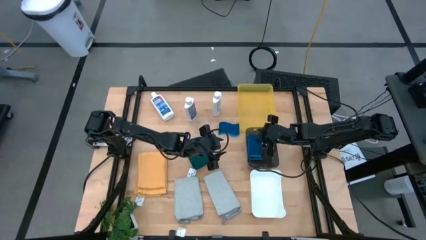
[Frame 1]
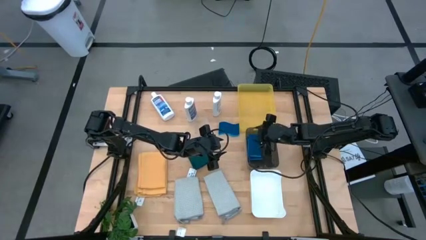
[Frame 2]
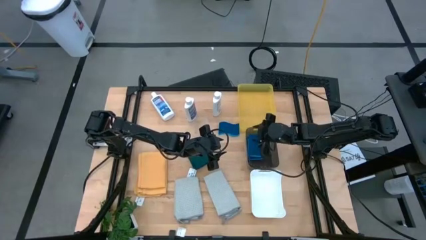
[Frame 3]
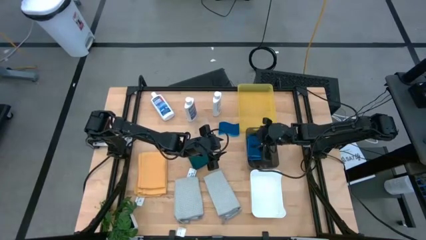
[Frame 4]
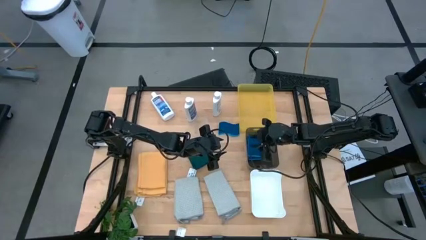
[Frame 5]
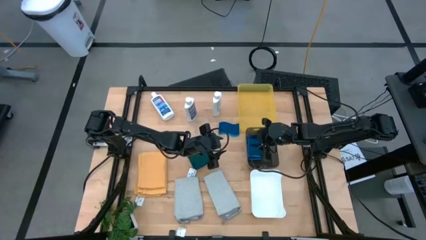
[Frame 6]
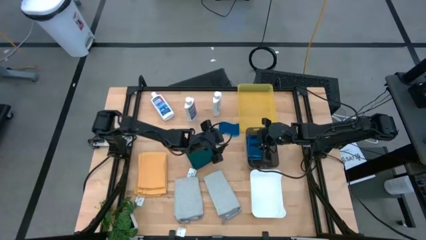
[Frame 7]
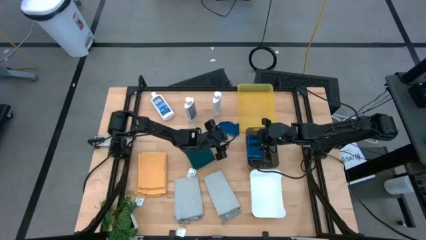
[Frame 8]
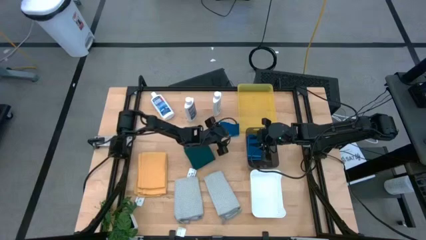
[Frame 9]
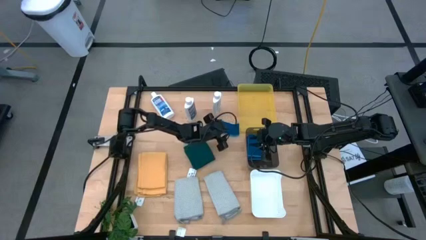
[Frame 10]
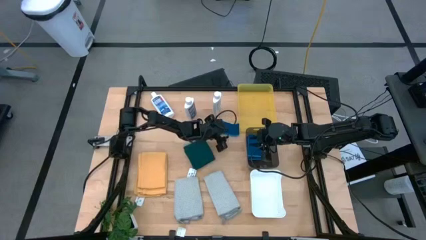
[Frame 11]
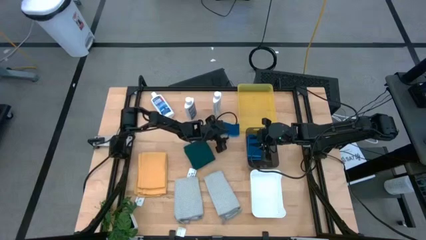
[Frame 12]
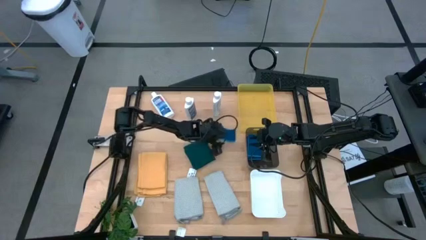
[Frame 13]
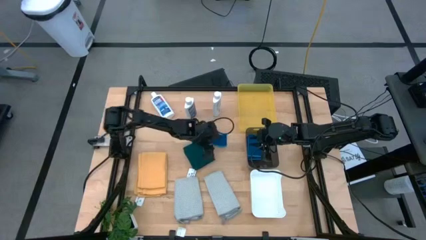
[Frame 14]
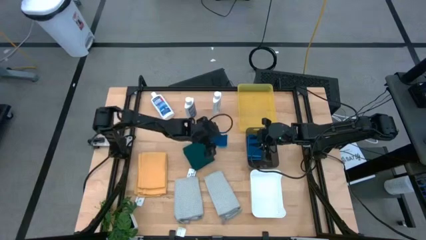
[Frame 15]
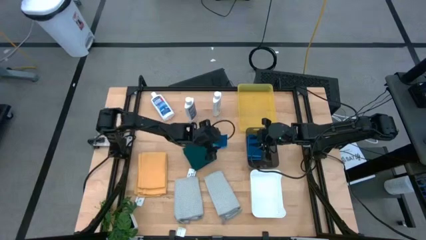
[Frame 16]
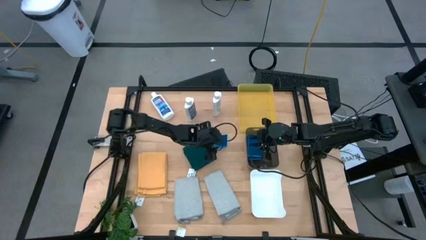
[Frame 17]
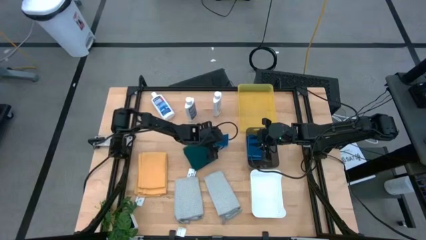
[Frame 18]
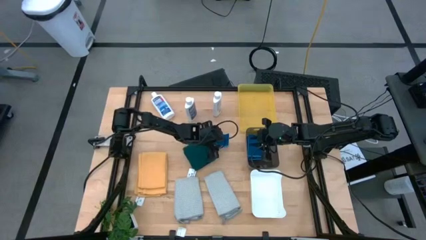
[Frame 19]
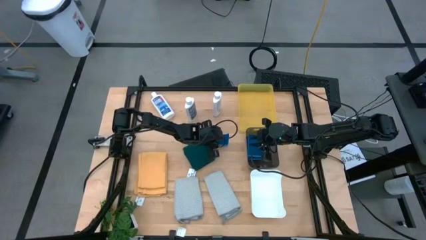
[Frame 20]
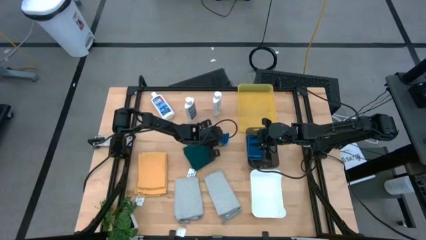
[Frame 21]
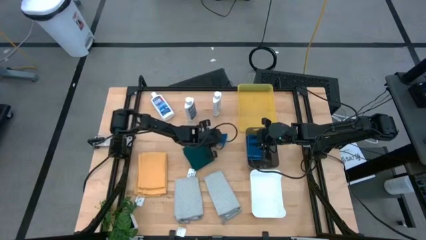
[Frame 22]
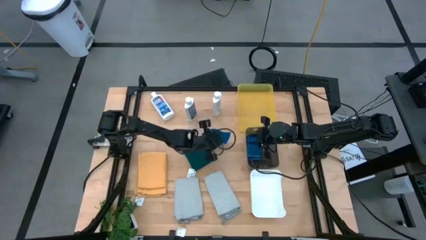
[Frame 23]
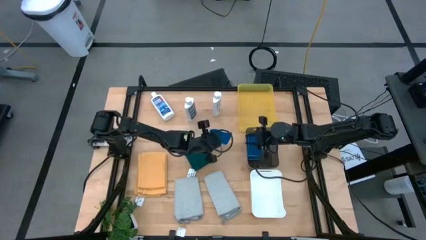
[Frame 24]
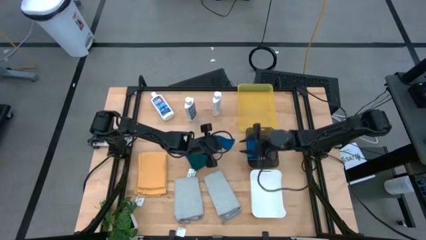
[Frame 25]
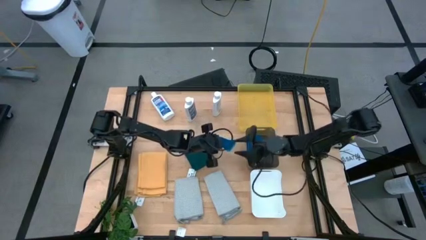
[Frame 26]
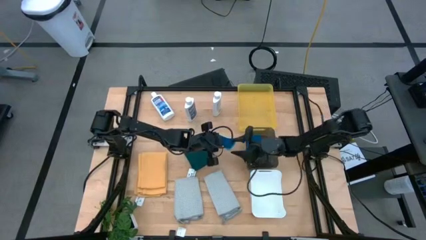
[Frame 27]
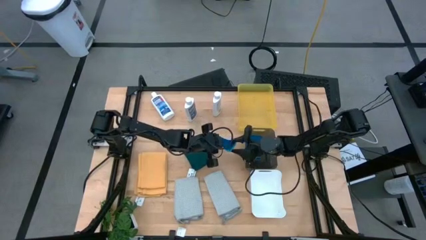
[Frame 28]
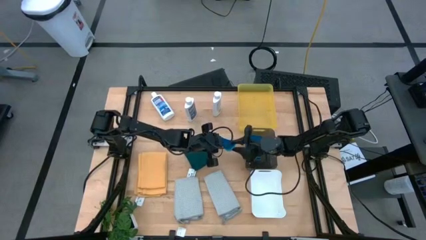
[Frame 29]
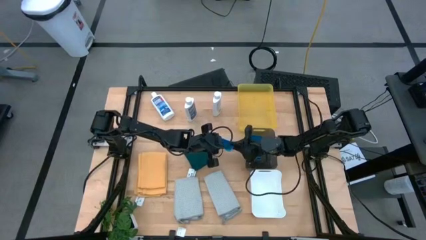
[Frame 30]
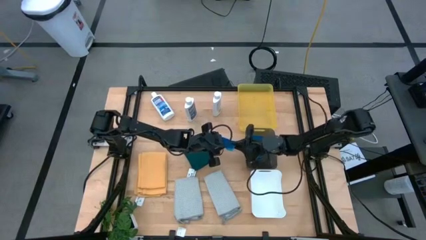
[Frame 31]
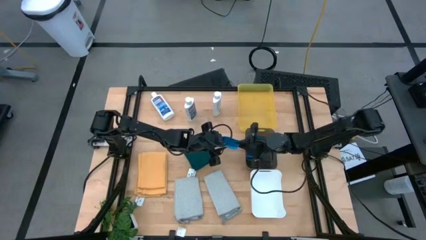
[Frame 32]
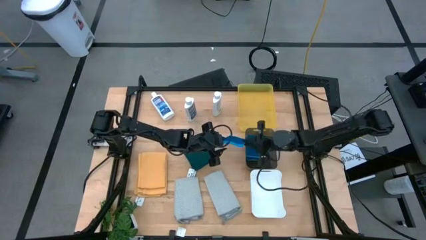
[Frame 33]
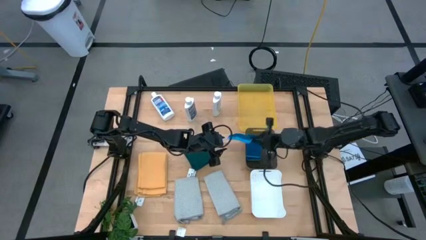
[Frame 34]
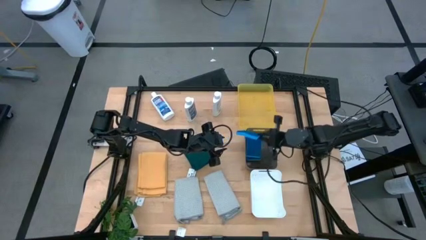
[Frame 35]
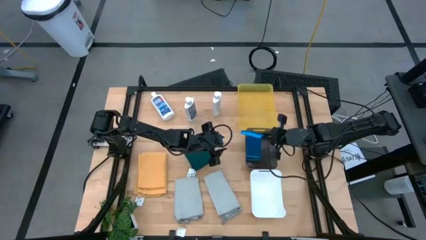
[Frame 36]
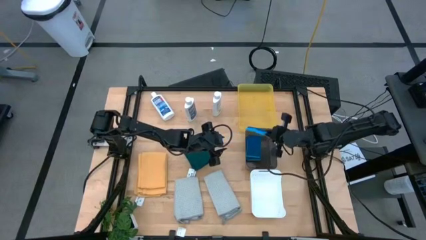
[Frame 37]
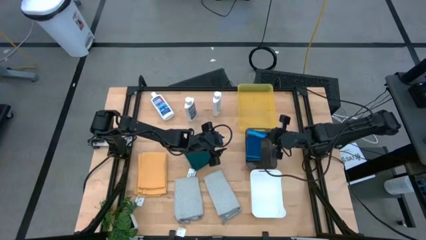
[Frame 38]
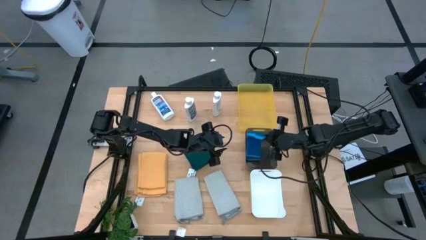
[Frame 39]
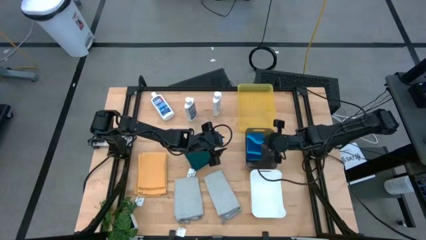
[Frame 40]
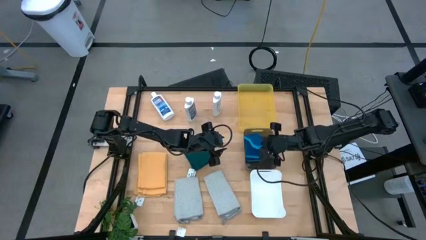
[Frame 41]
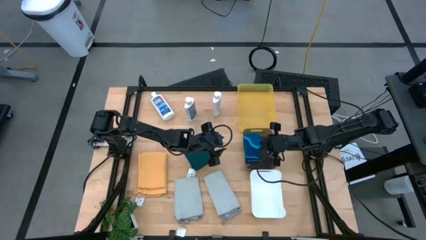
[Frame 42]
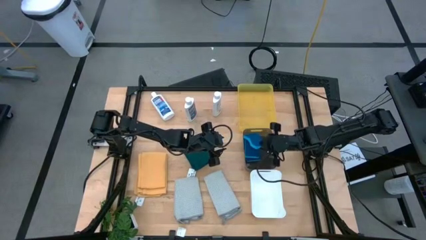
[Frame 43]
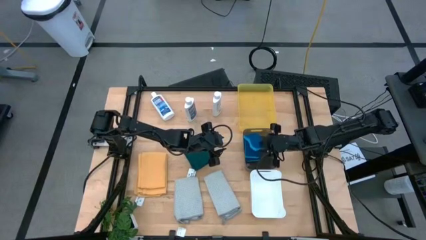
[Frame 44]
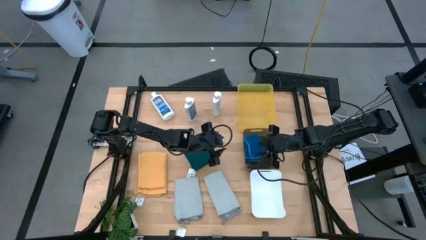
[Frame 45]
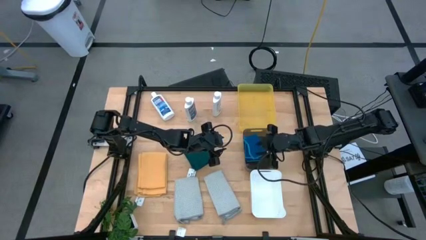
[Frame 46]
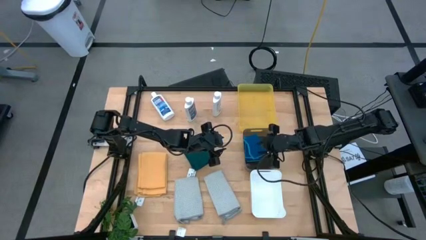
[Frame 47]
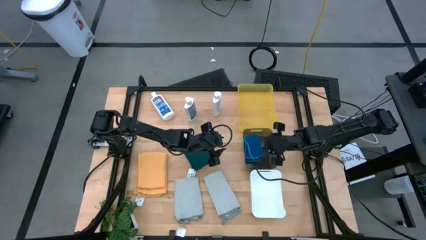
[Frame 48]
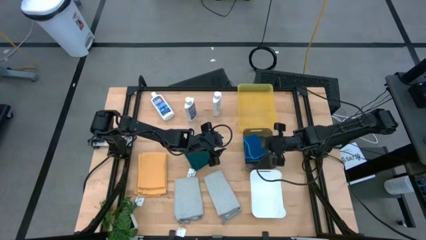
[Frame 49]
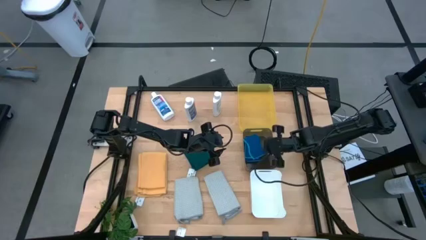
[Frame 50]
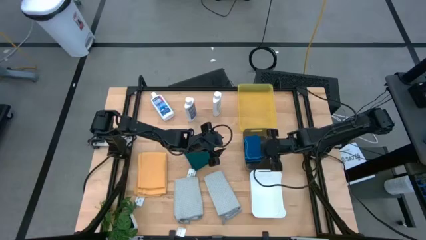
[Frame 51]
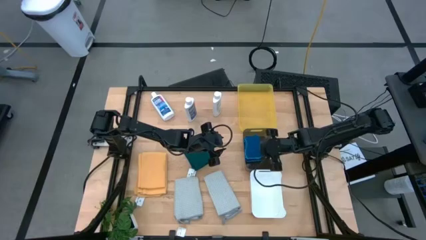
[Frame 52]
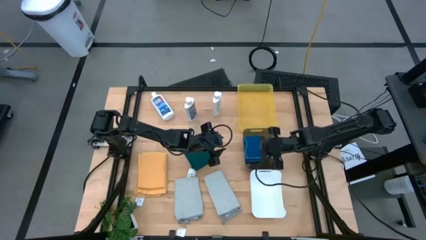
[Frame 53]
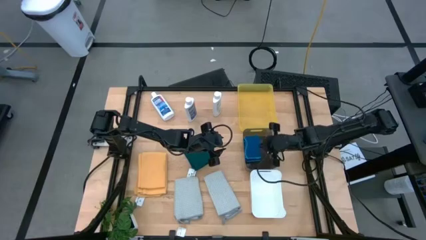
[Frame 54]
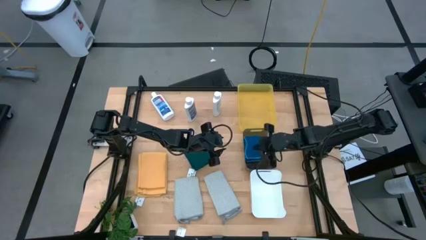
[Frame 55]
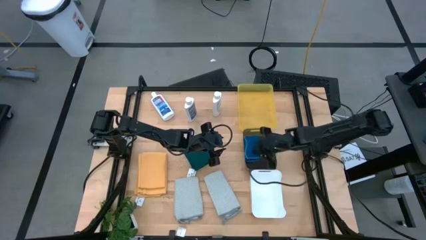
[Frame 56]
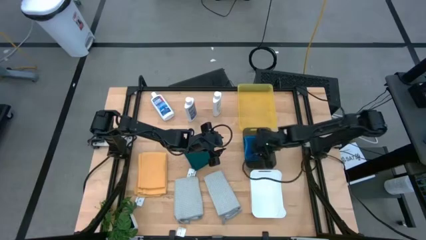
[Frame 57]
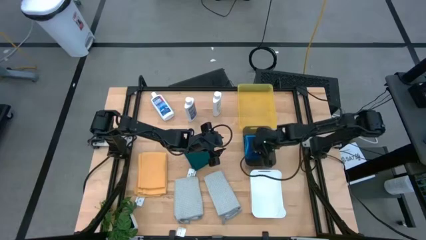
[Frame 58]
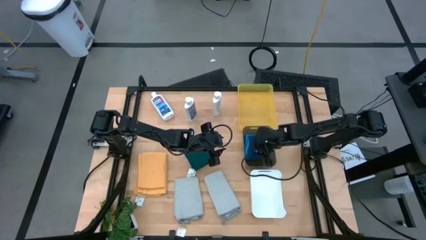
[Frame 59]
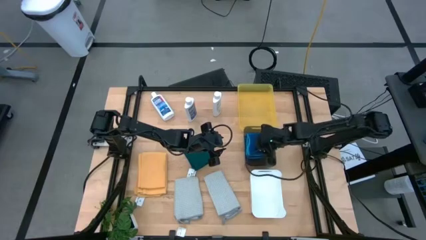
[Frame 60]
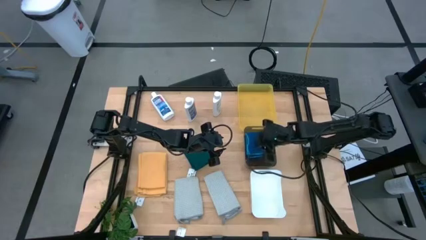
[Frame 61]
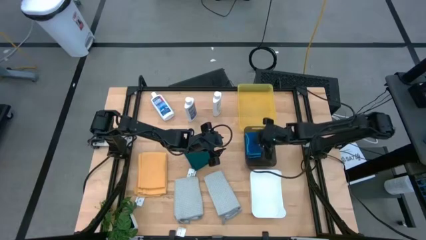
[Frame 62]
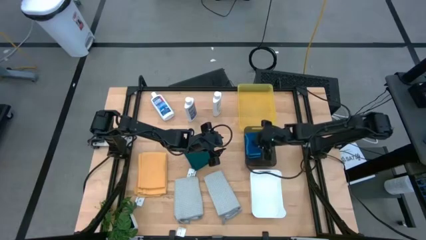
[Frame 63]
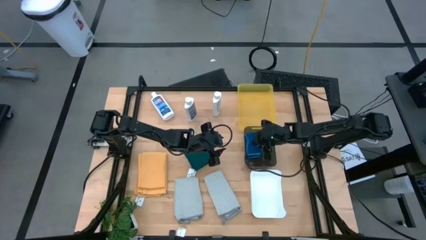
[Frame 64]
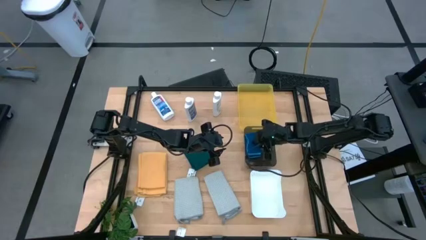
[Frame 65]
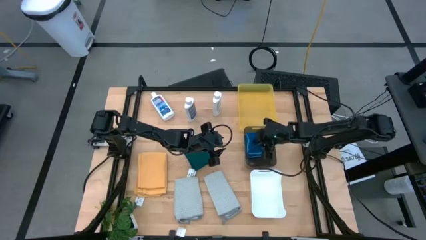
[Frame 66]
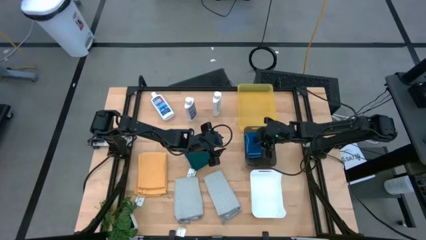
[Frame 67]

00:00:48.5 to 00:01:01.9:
Task: Pick & Place Kitchen Items
Put the blue sponge into the black bin
